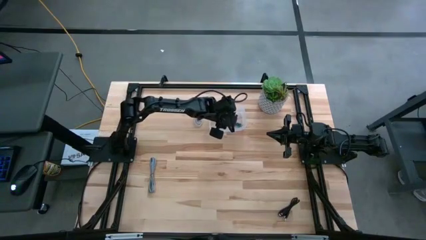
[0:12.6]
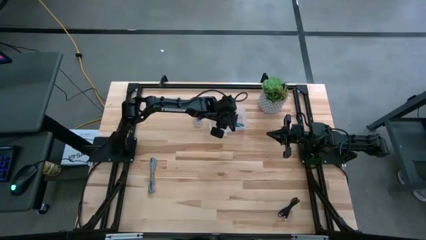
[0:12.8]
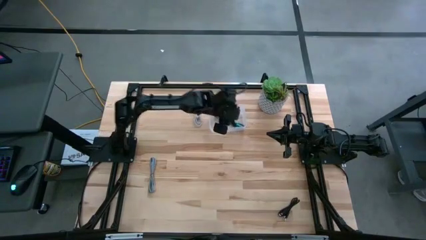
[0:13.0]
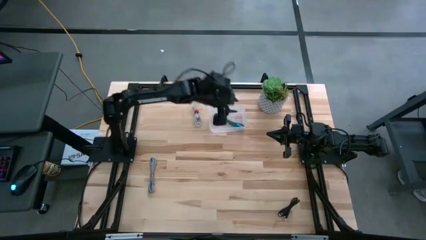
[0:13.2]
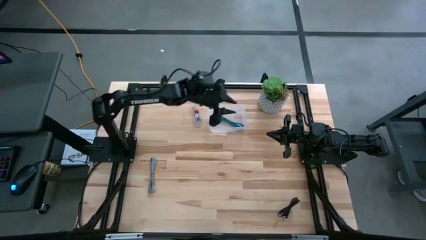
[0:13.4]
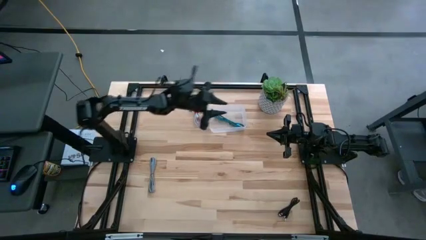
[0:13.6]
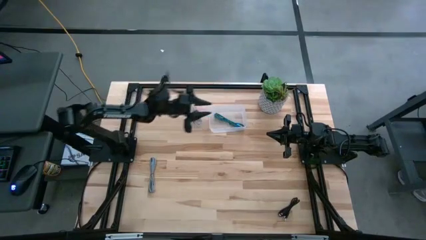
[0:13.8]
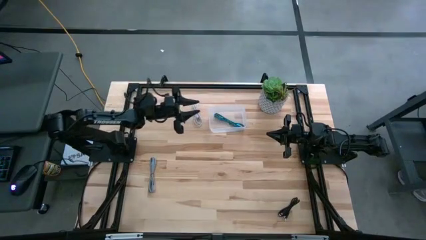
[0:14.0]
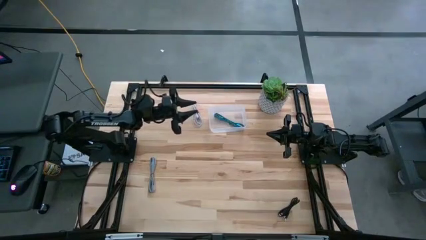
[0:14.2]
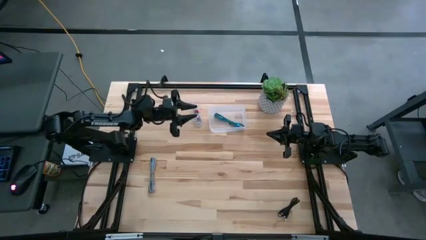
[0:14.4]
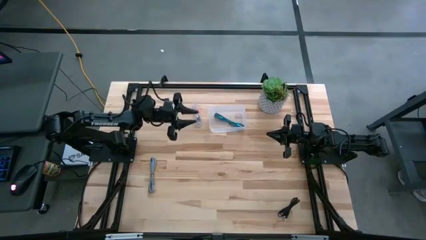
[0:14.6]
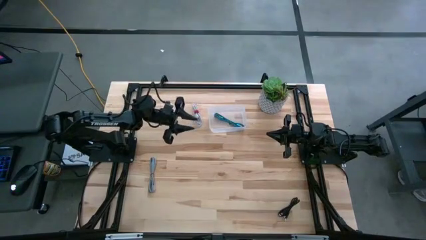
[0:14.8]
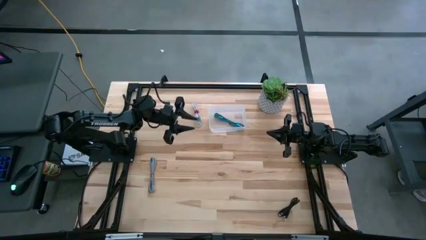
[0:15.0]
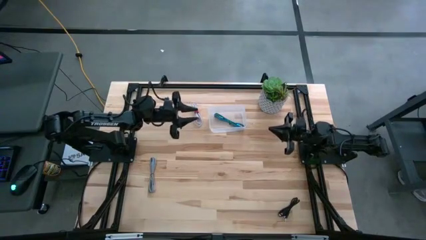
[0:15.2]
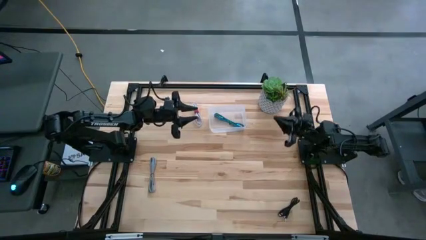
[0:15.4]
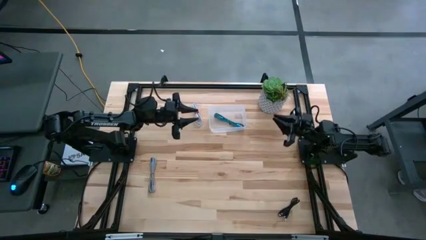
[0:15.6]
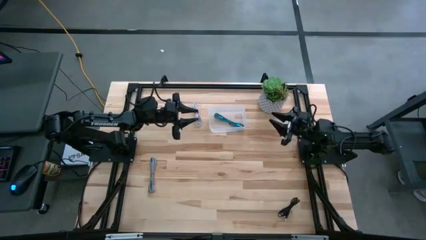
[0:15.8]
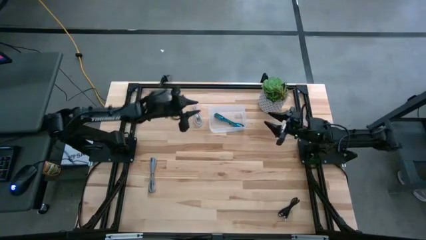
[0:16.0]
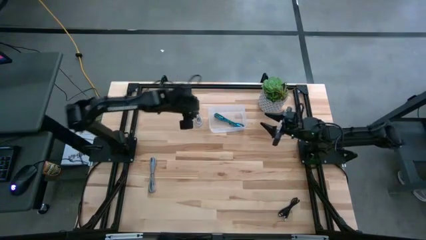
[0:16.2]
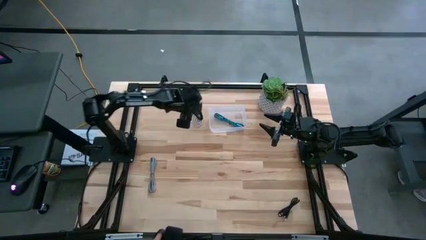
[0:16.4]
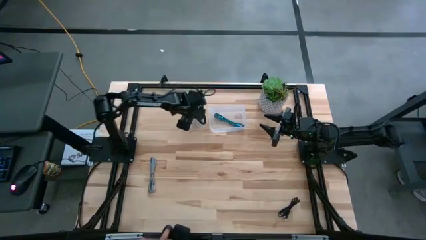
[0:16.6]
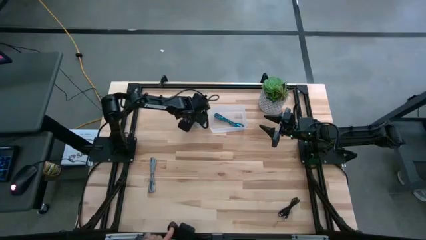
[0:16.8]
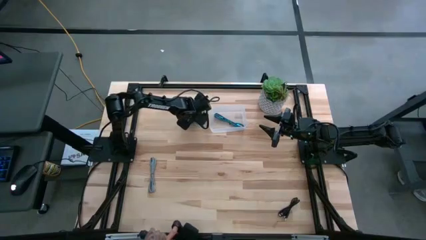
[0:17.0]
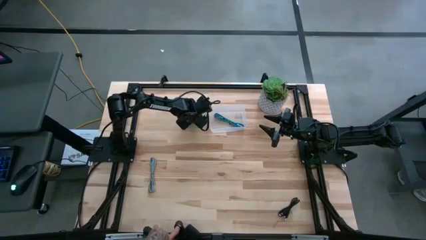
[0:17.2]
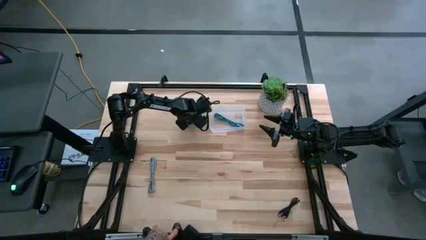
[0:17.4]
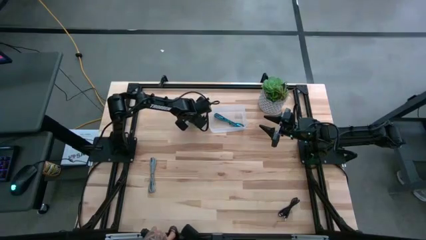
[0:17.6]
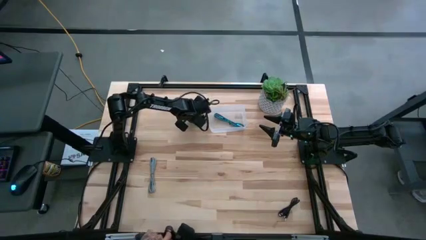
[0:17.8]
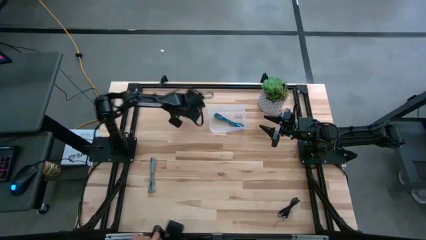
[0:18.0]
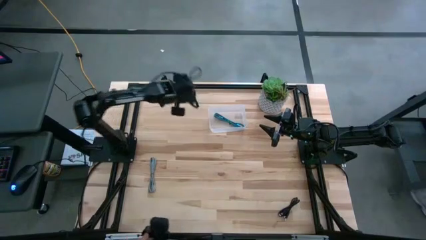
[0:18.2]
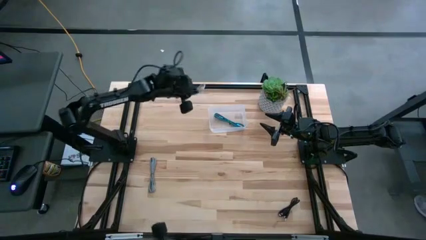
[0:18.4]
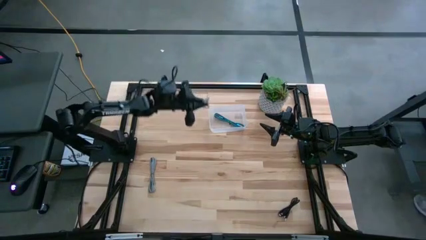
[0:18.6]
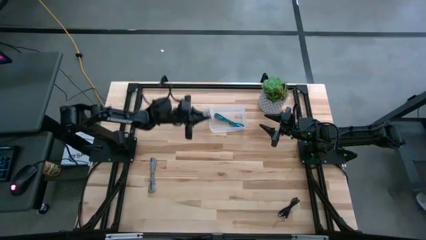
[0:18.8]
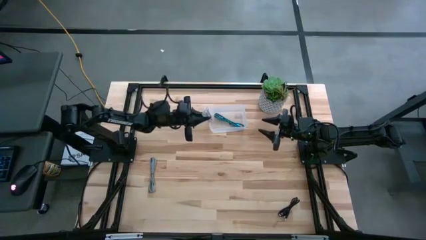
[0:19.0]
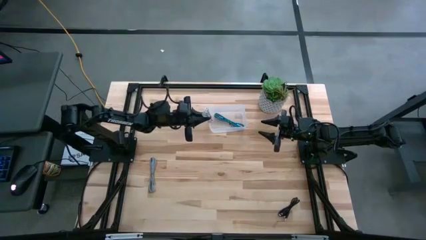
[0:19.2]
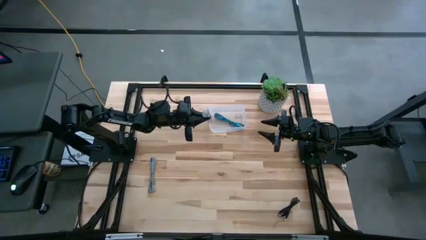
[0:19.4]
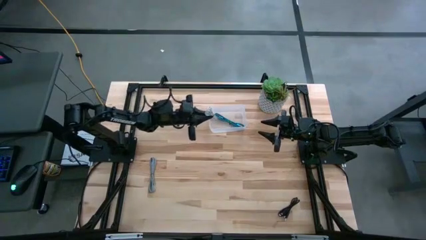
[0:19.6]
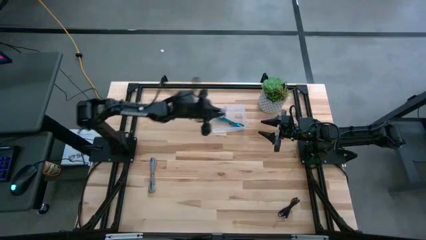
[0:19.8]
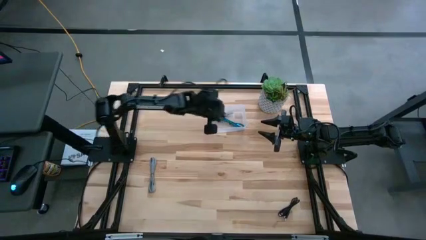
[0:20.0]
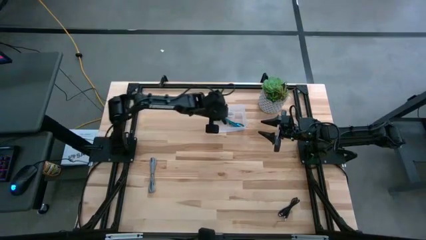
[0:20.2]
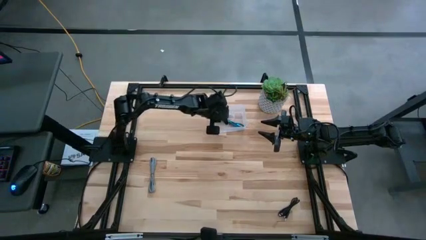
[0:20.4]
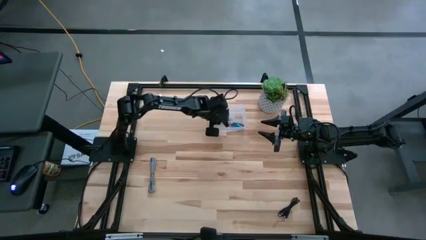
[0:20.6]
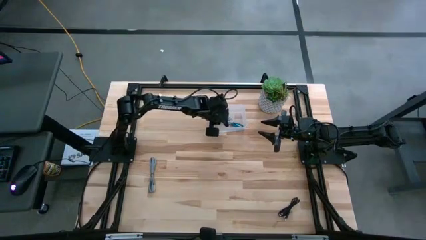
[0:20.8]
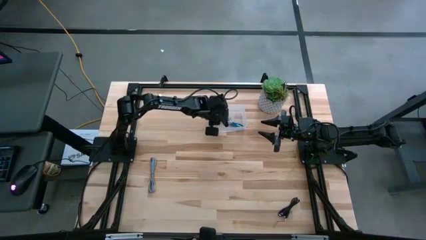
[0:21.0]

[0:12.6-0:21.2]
Task: Pick and place USB-C Cables
Put the white charger cable into the transparent bin

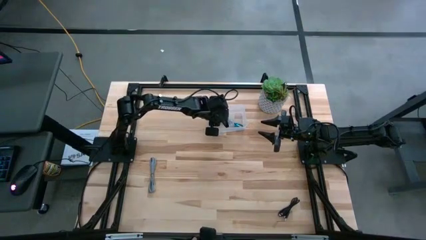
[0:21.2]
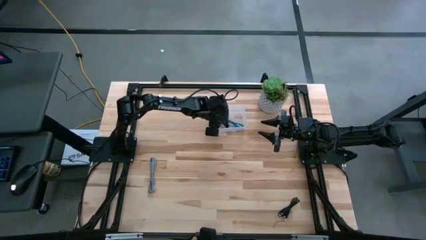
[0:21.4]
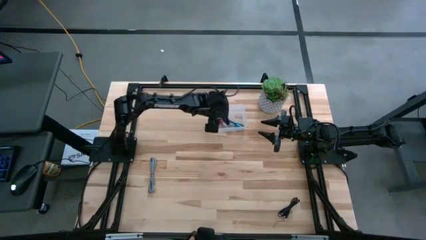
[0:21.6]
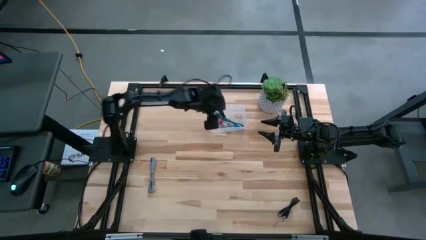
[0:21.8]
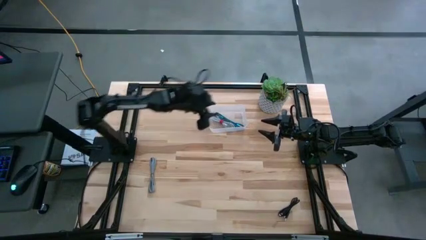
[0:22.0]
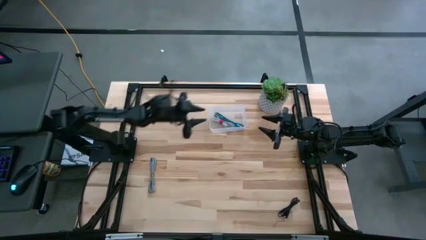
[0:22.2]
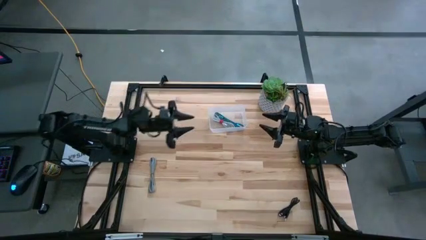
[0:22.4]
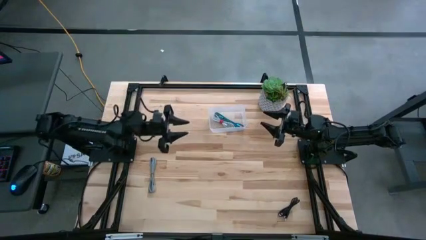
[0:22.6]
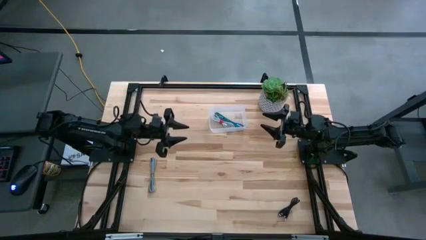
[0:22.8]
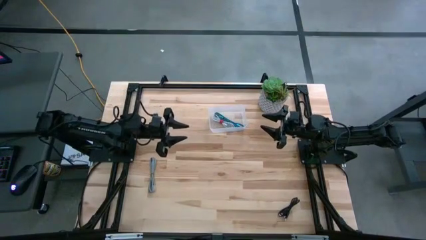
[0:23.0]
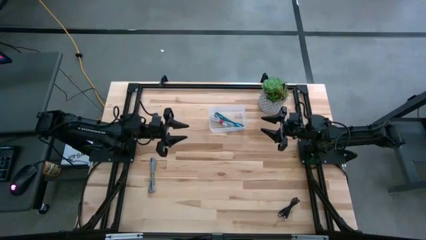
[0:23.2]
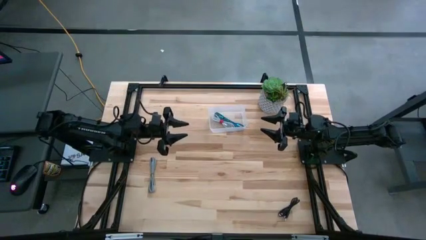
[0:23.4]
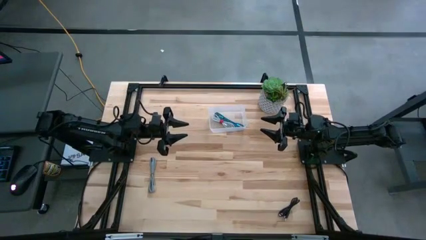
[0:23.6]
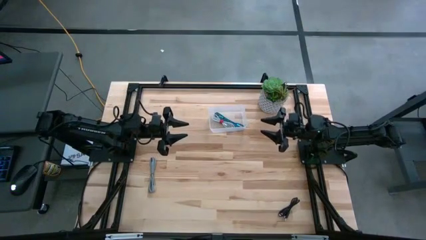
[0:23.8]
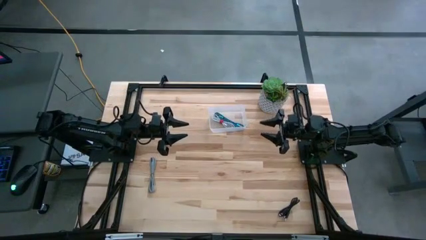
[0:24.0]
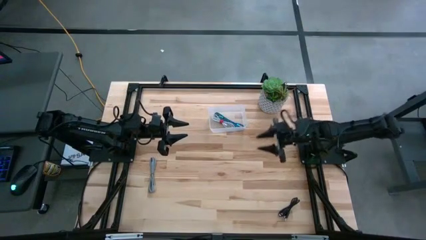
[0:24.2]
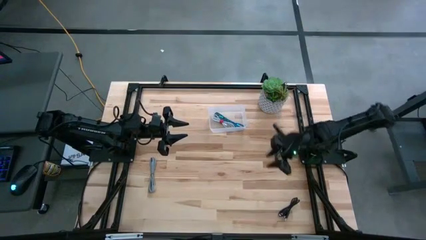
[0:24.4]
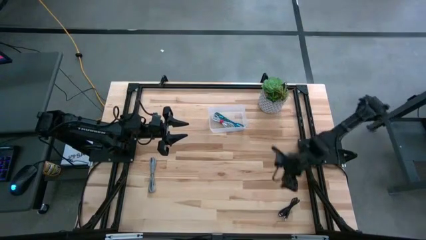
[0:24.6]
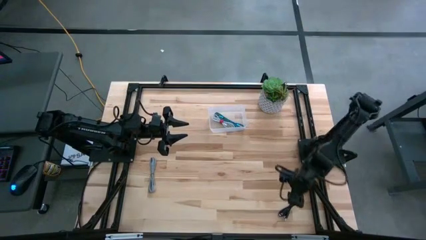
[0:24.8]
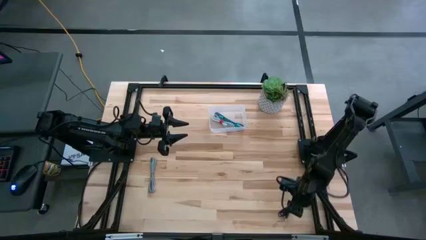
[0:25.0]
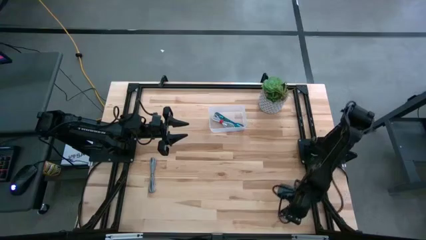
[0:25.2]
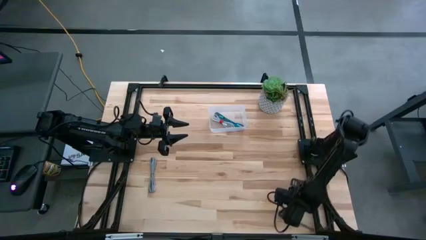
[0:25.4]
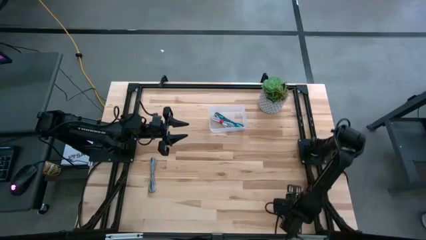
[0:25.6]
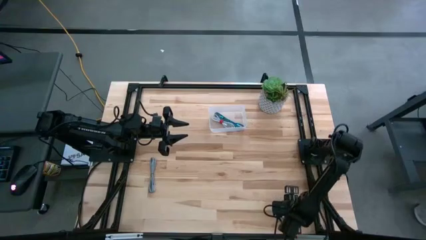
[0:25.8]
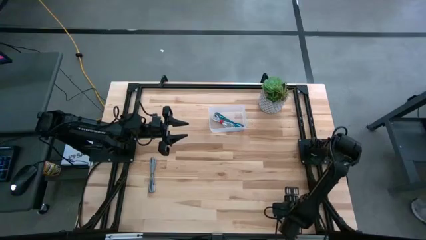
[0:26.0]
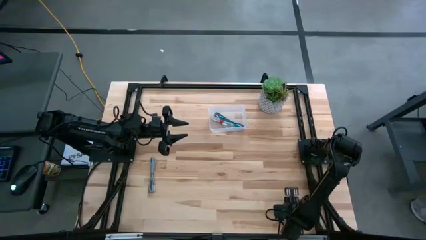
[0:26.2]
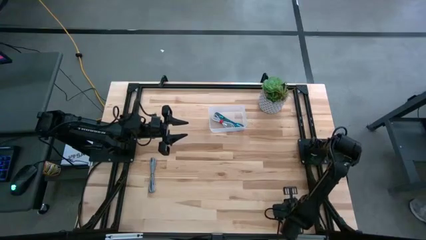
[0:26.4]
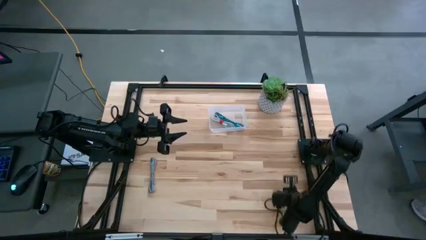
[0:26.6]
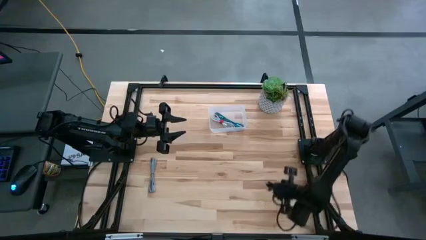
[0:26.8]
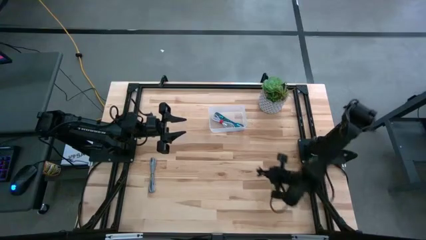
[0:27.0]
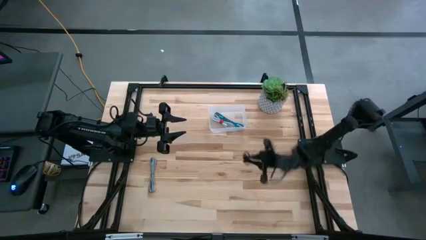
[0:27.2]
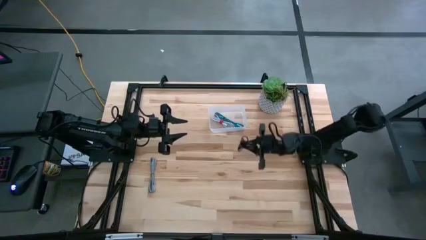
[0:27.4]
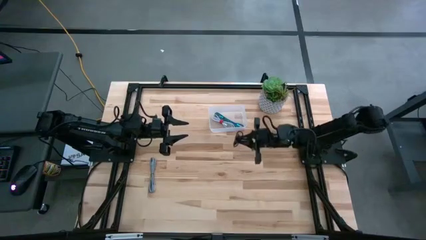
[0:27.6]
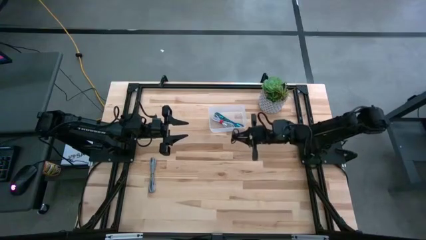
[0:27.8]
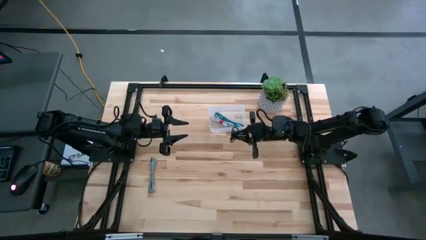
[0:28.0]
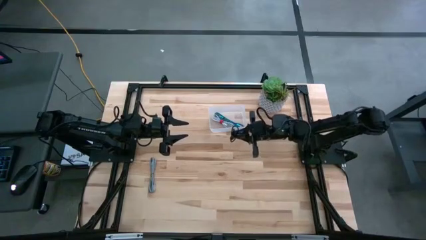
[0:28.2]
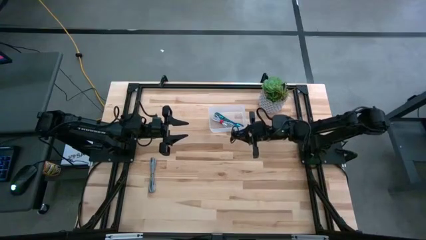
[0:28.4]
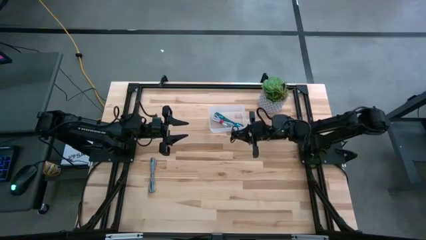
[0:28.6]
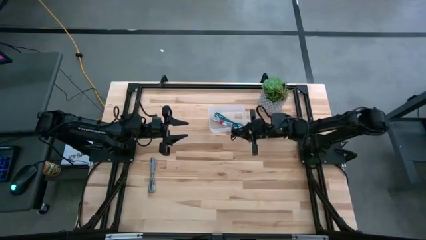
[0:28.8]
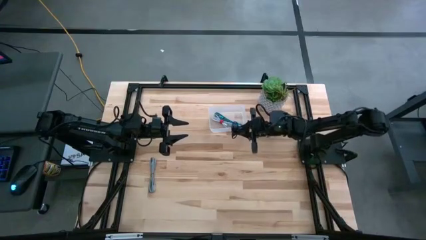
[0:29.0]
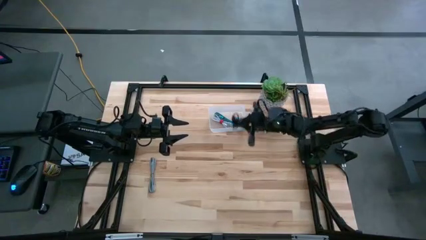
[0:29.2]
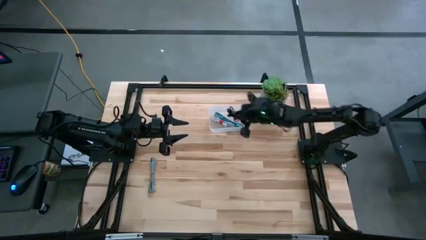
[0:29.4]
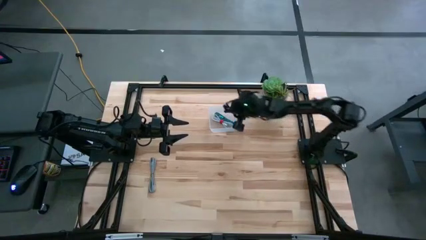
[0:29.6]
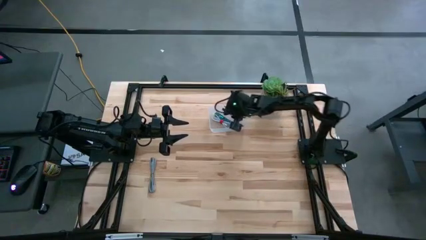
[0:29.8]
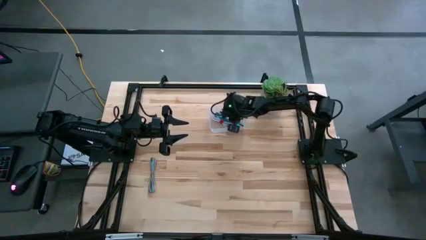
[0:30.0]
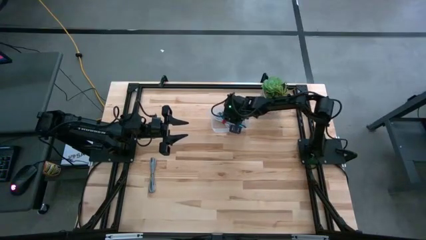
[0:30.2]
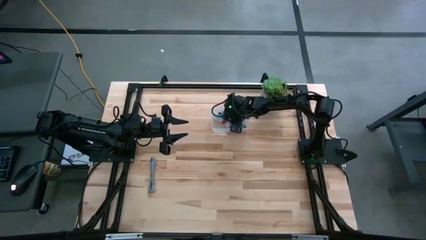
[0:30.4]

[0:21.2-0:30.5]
Put the black charger cable into the transparent bin
